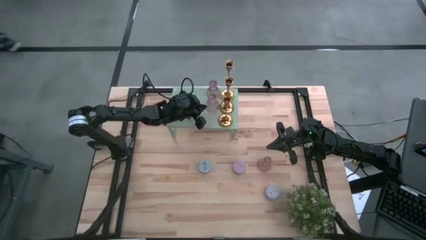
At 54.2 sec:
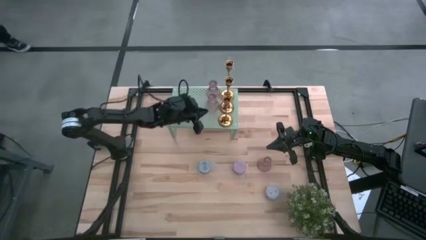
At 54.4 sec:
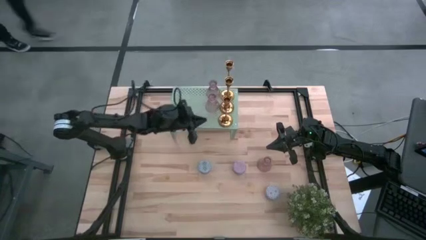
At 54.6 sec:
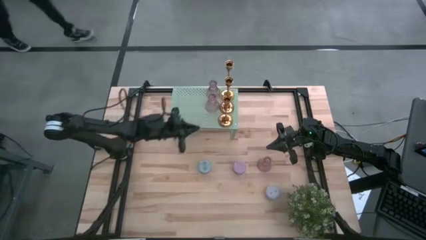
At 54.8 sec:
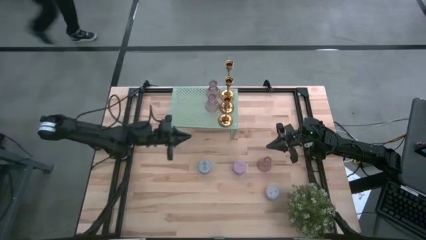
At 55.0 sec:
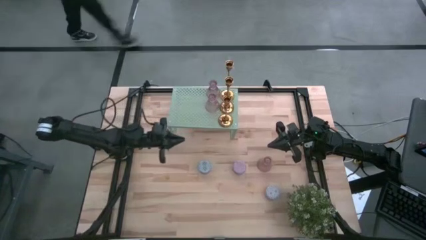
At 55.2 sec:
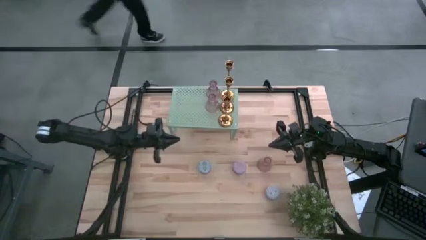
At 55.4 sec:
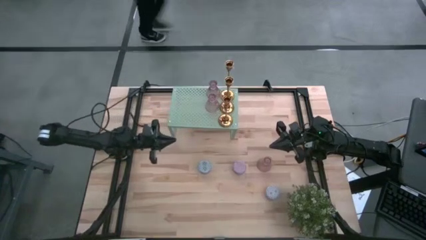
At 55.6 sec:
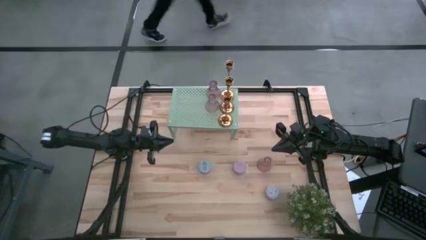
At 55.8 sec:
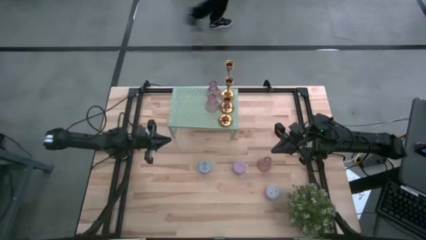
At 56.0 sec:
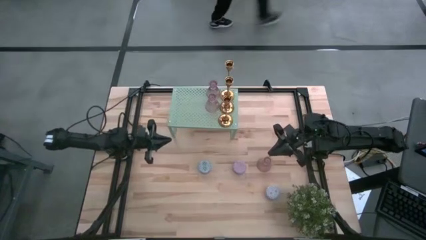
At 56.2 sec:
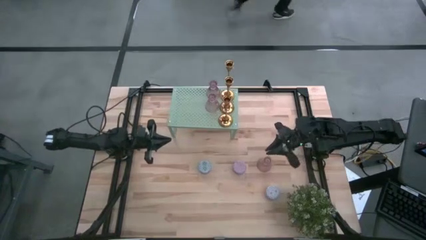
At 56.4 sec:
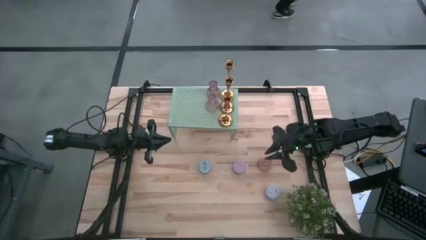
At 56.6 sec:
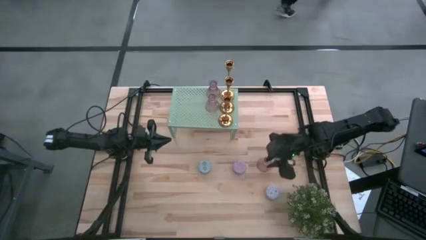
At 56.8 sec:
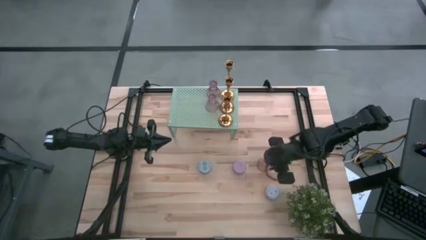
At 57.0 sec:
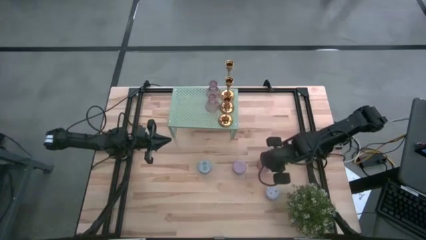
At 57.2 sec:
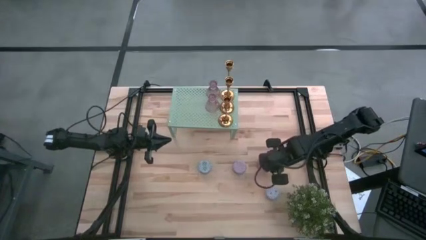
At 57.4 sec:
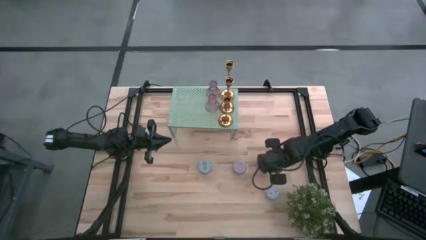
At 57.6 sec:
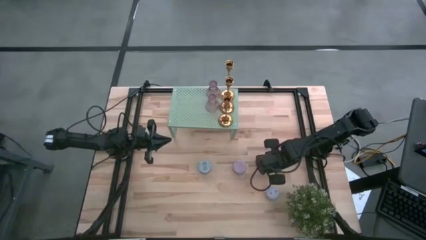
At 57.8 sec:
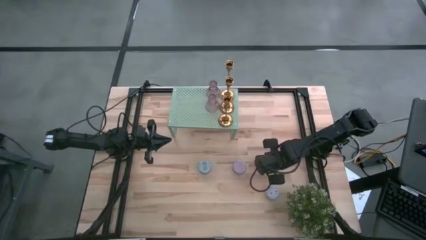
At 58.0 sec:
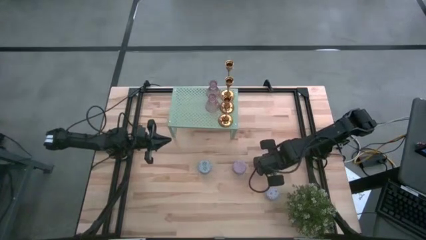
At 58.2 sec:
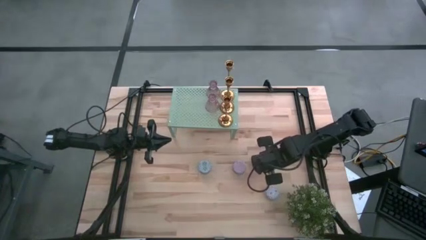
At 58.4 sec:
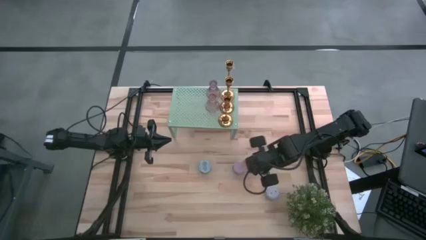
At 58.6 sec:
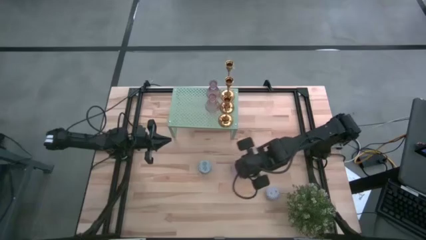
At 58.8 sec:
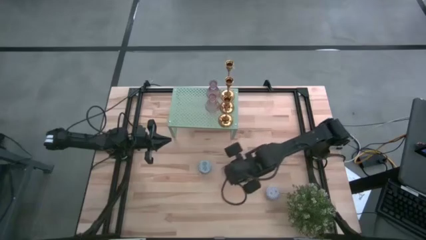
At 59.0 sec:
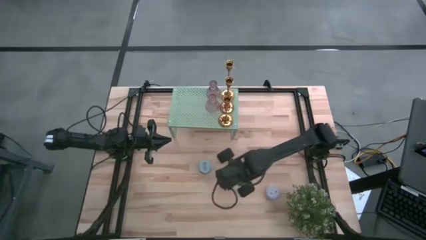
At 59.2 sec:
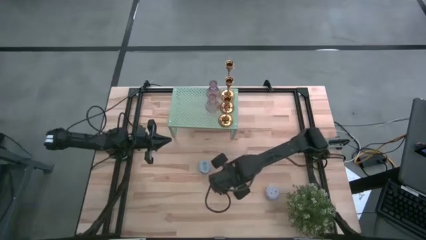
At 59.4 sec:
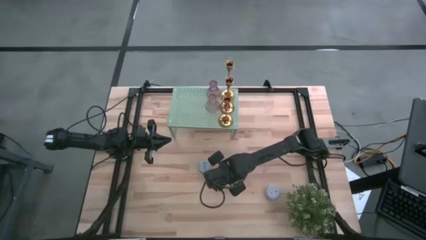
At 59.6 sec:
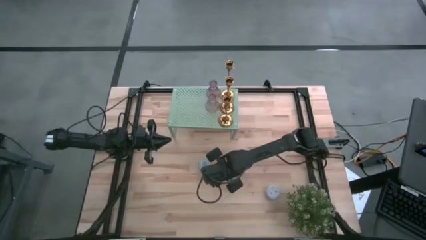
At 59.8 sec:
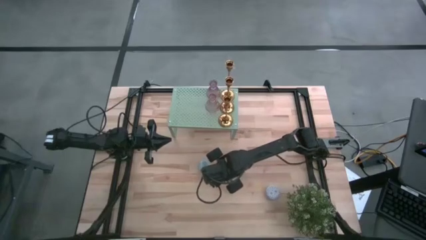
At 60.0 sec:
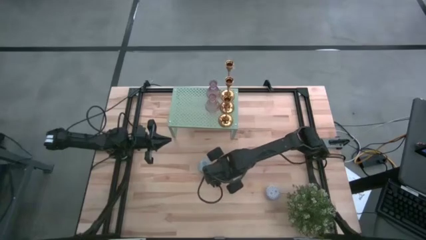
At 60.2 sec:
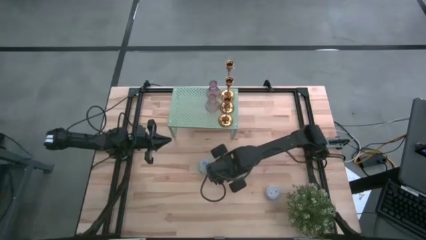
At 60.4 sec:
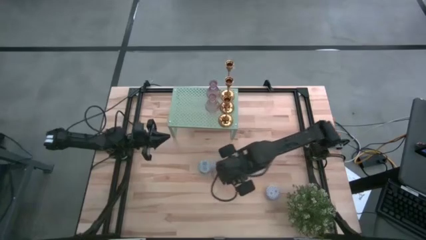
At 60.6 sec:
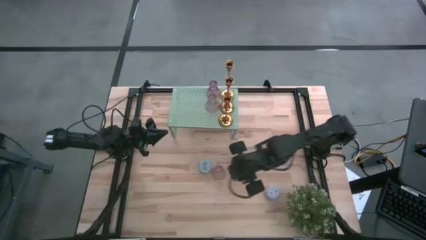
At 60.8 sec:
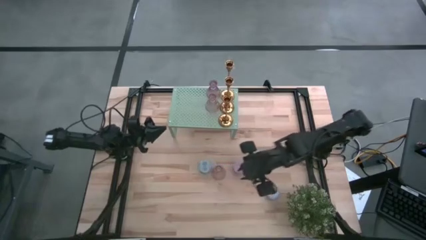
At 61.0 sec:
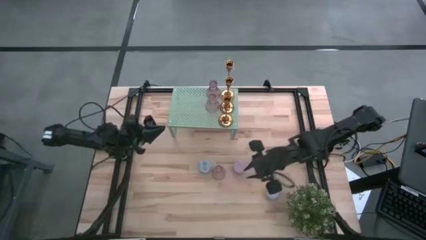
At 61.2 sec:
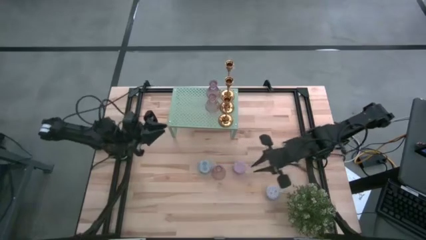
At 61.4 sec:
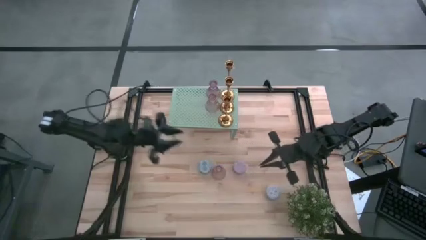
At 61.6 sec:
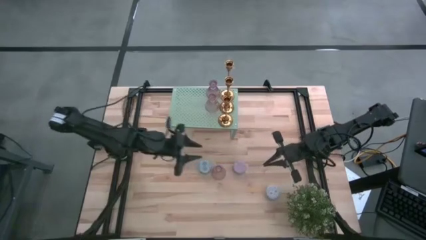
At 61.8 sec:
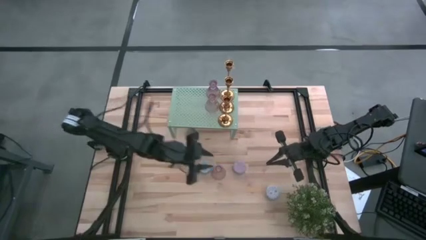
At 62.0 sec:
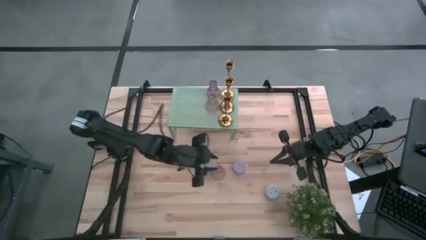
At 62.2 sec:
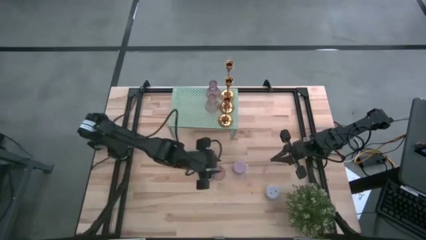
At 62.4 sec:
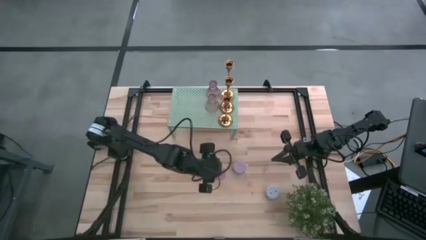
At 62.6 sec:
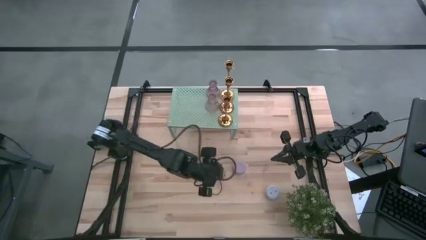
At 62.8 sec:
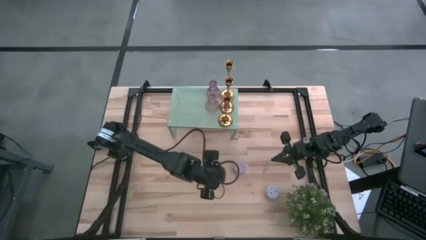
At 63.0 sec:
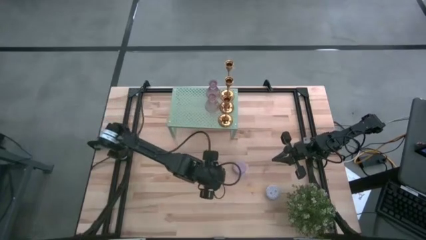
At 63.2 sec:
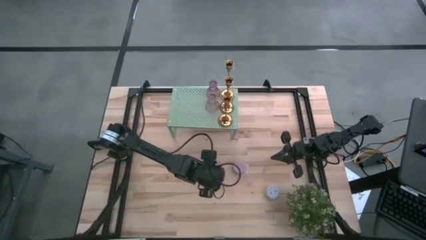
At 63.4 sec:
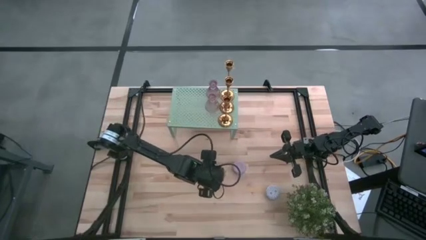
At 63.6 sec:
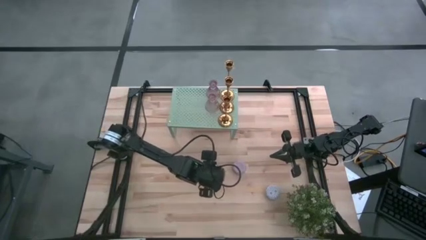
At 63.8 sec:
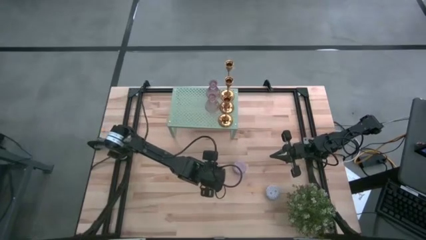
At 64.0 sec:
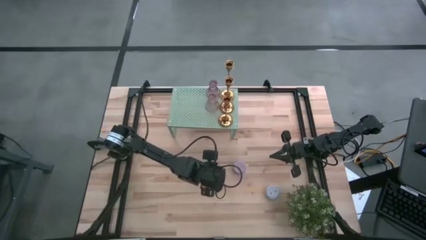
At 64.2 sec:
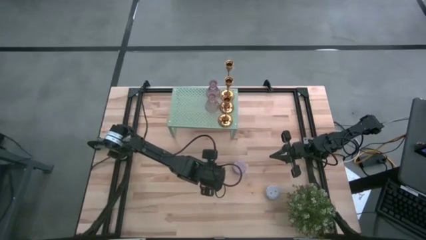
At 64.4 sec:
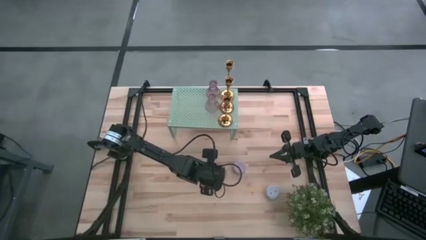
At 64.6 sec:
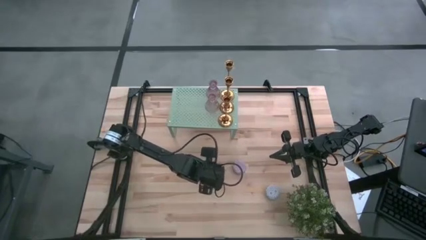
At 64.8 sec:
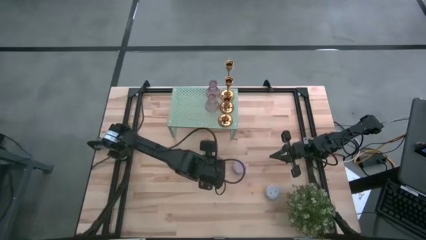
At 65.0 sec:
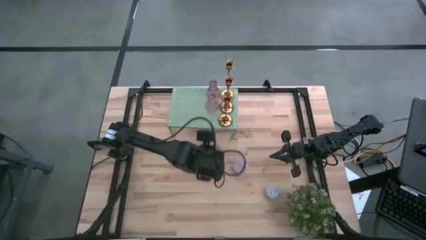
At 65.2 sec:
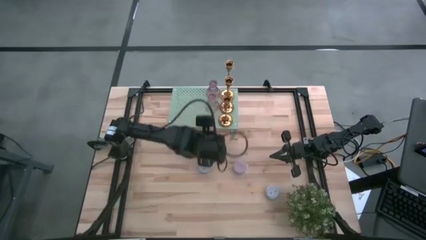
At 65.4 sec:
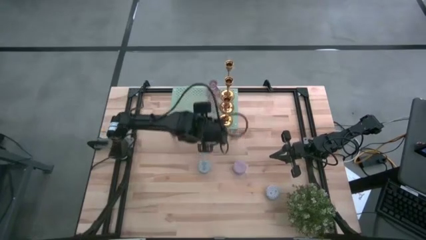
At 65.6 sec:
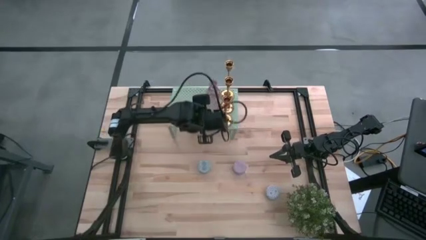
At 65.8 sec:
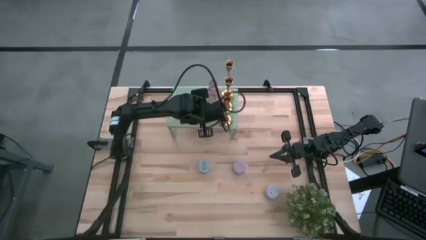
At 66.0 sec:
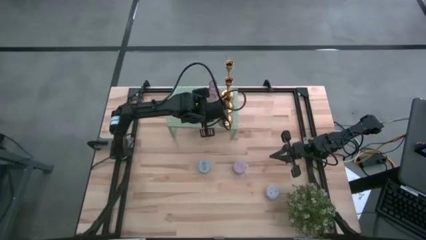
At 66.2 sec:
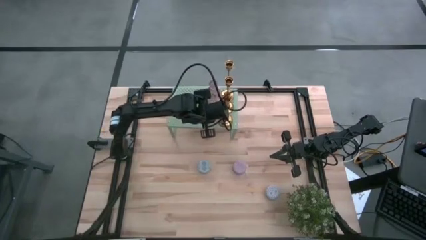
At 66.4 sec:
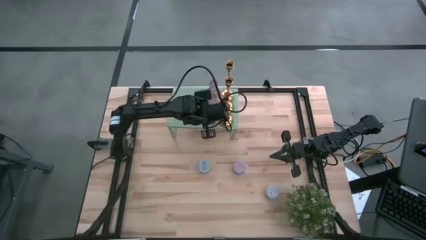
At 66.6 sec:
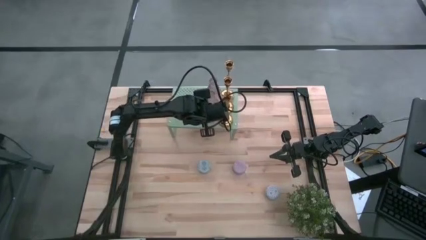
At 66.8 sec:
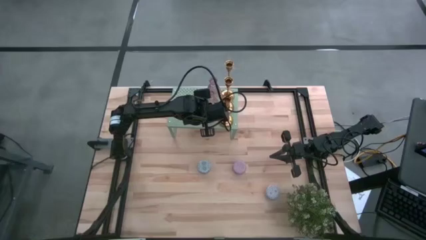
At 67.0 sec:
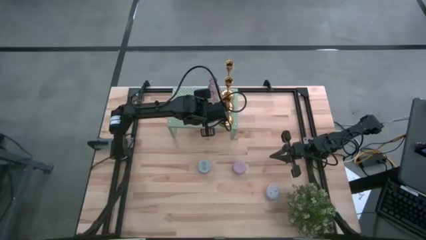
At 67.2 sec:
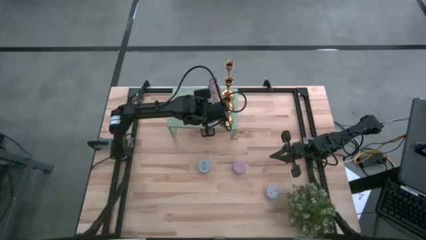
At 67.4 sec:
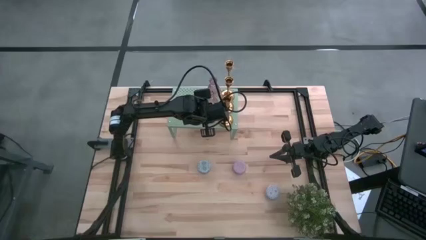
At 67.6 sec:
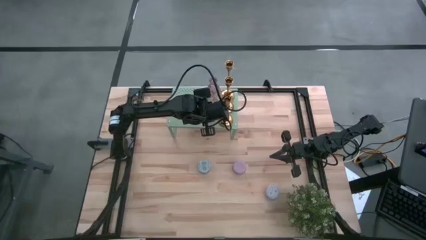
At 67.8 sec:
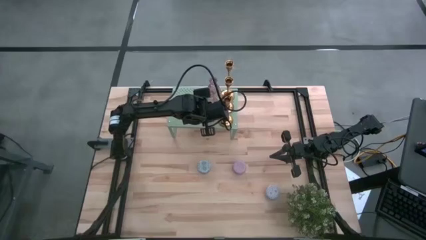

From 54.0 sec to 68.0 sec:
Task: Pick & Place candle stick holders
Put the purple candle holder on the shelf aligned with the purple candle holders

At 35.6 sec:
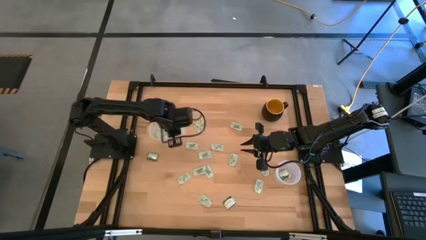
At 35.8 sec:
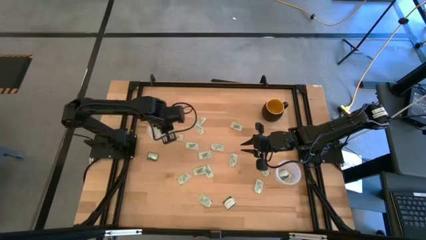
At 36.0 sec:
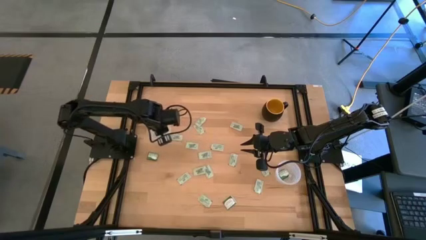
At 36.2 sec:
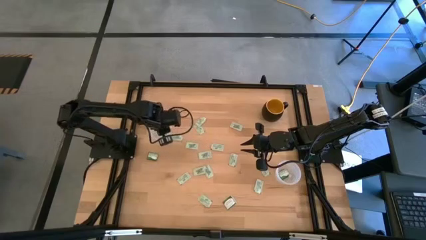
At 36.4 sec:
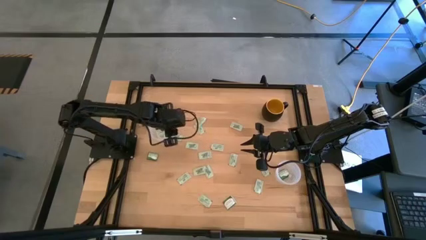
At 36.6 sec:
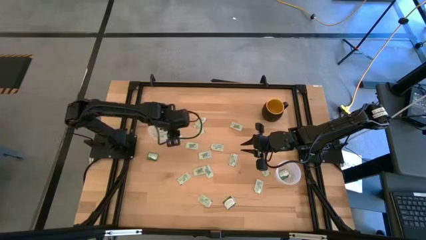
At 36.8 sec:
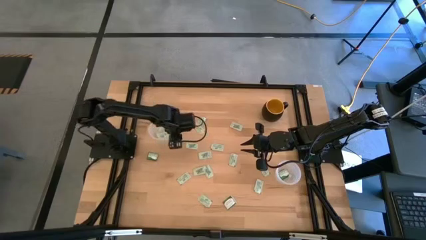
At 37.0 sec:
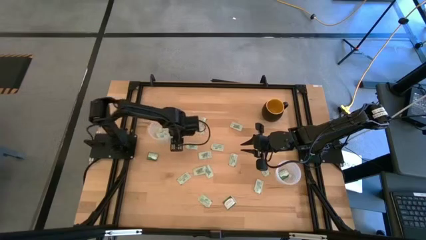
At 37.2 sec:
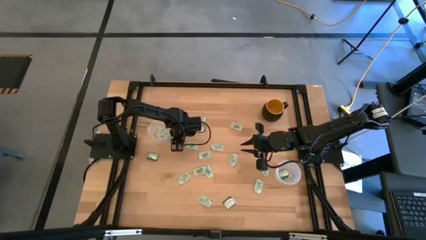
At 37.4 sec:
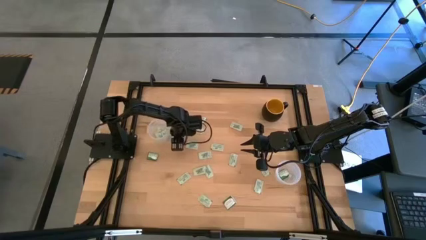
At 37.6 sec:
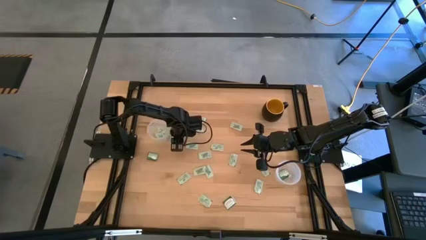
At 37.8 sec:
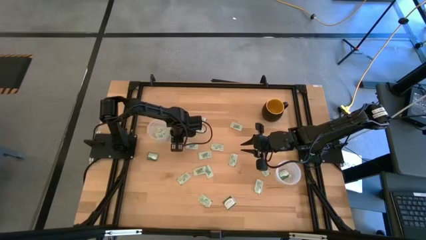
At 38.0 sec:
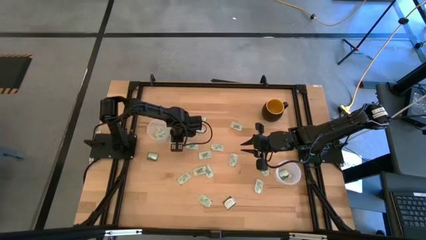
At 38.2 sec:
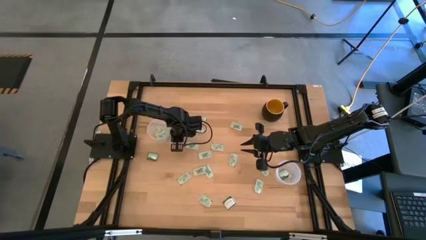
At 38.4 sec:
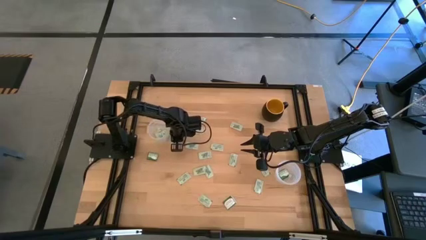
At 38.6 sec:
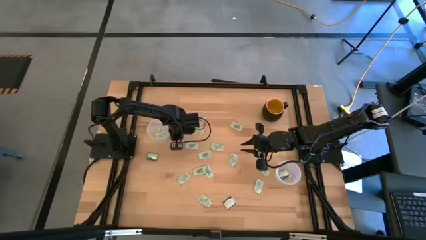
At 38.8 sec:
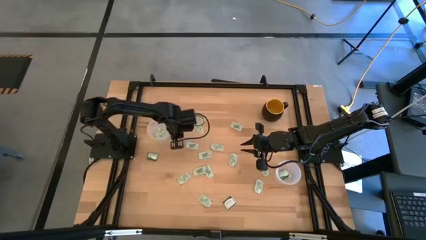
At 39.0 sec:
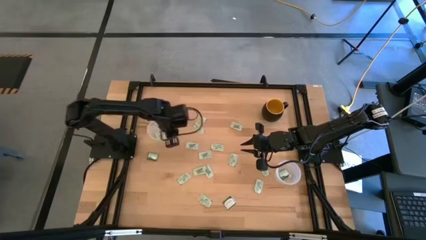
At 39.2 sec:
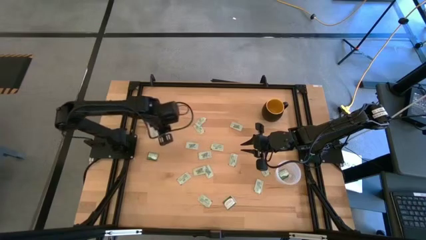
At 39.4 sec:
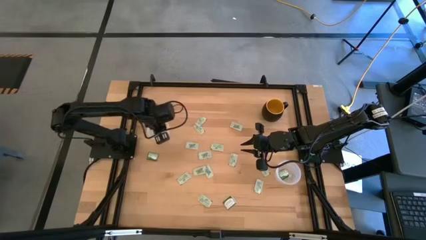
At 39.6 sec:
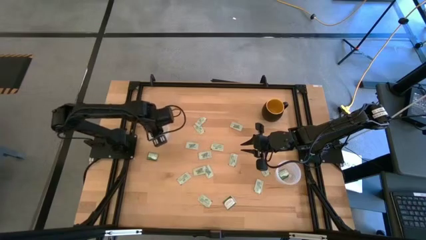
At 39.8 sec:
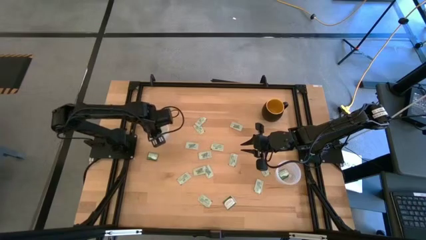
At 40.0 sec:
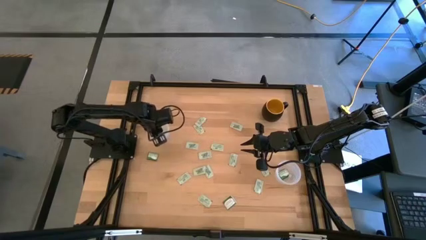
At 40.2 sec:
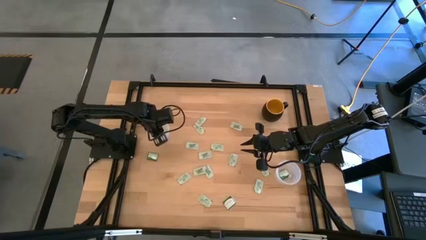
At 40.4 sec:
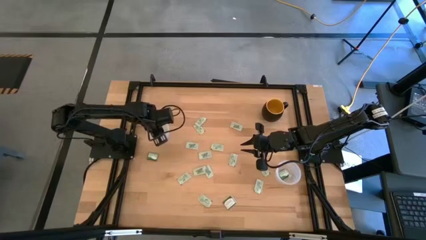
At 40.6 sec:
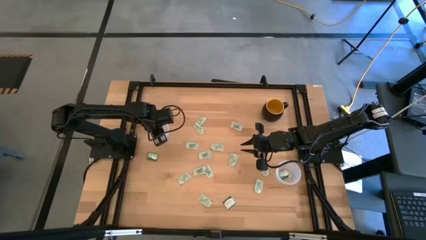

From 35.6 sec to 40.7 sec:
Task: Pick and place Stevia / Truvia into bins
Put the white stevia packet into the left transparent container
